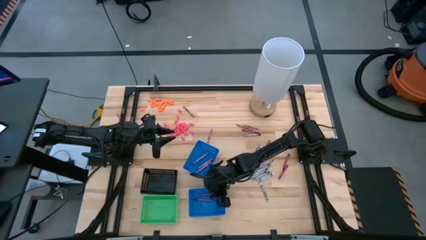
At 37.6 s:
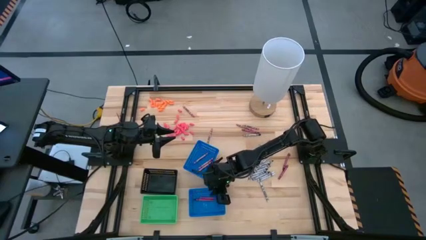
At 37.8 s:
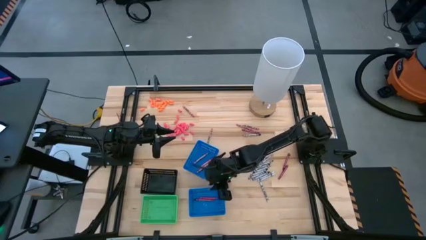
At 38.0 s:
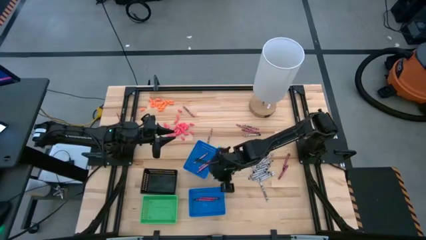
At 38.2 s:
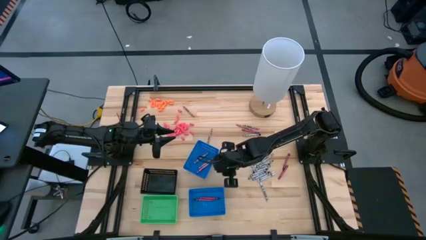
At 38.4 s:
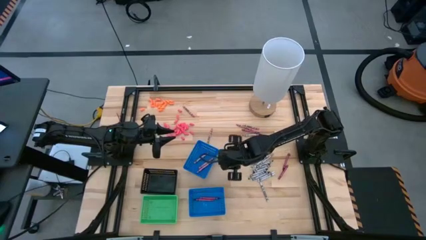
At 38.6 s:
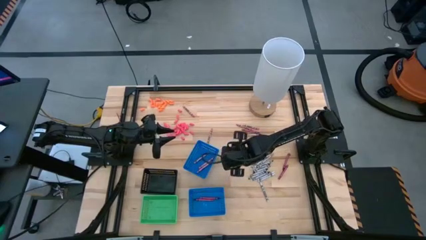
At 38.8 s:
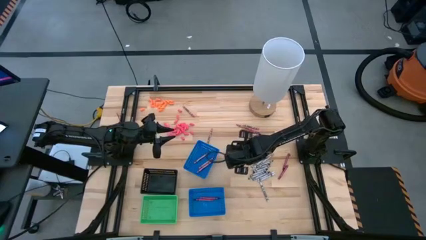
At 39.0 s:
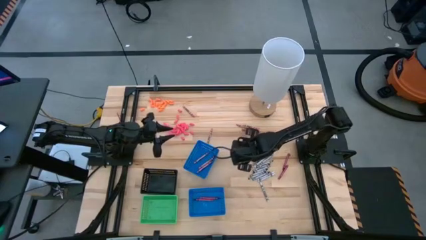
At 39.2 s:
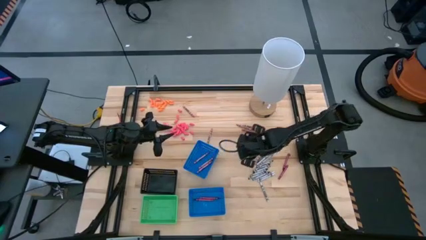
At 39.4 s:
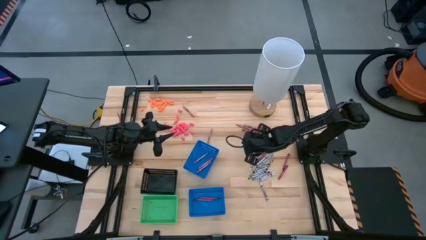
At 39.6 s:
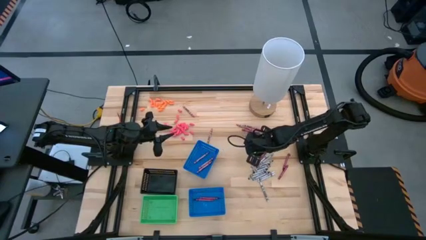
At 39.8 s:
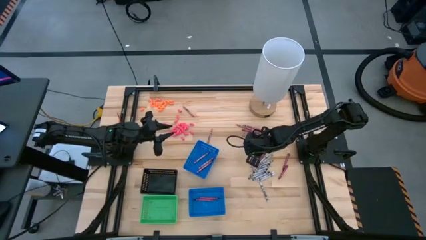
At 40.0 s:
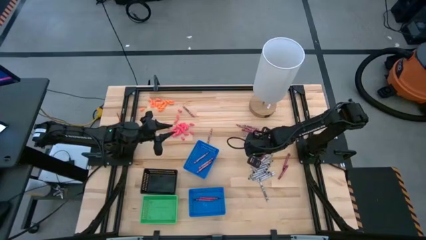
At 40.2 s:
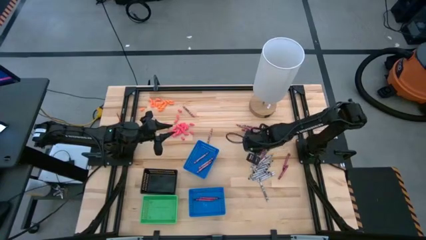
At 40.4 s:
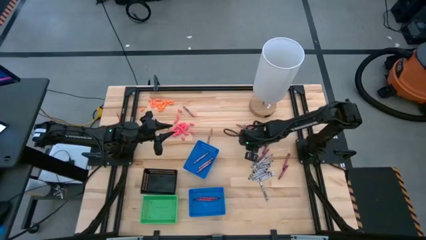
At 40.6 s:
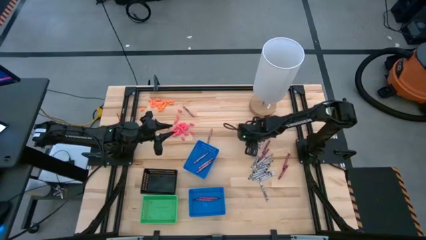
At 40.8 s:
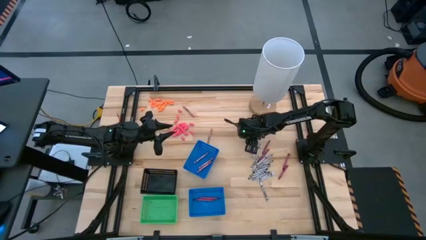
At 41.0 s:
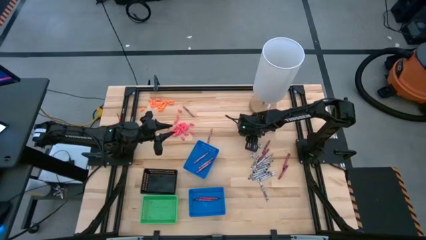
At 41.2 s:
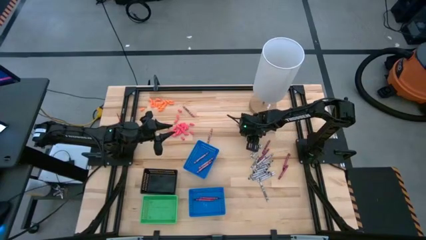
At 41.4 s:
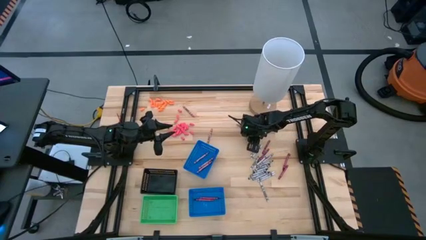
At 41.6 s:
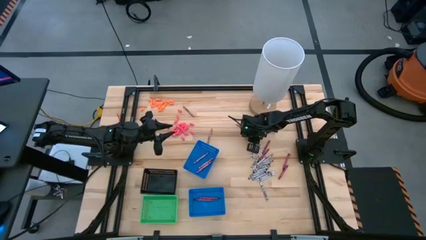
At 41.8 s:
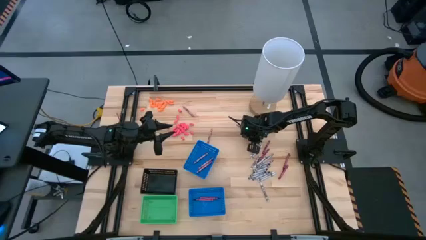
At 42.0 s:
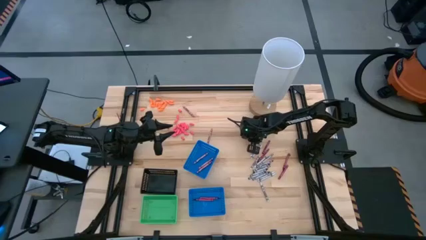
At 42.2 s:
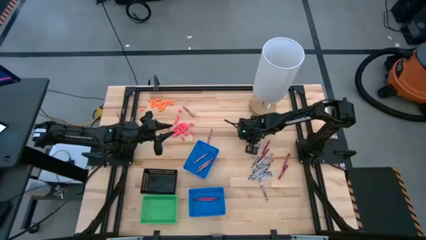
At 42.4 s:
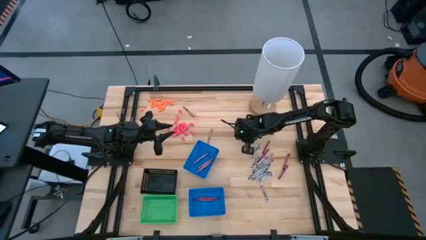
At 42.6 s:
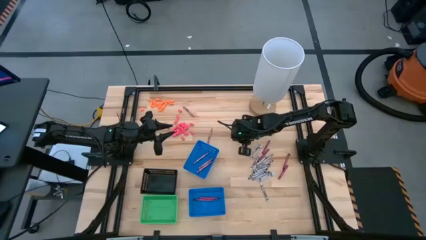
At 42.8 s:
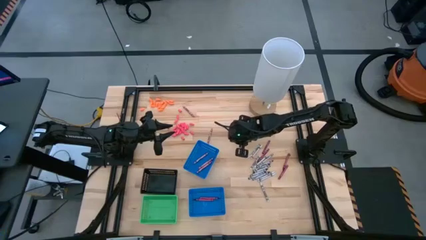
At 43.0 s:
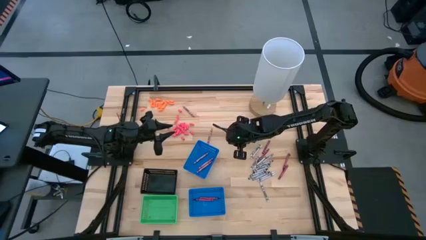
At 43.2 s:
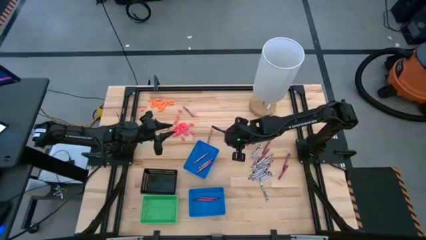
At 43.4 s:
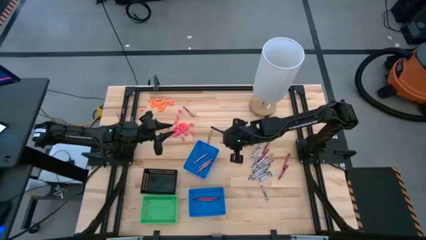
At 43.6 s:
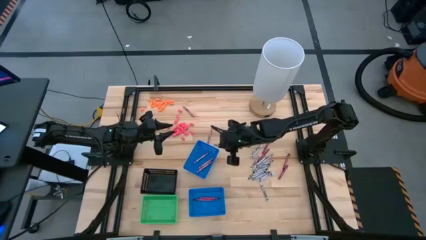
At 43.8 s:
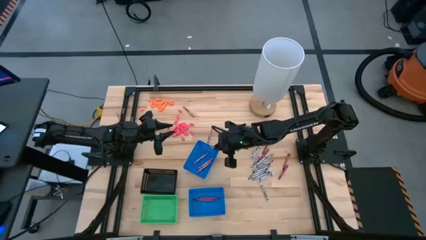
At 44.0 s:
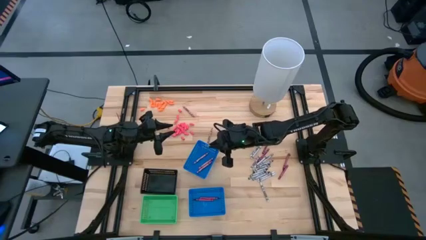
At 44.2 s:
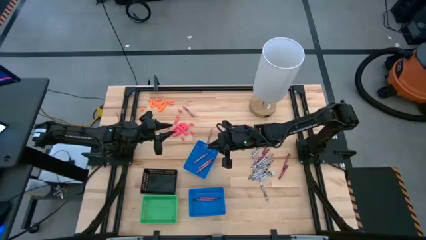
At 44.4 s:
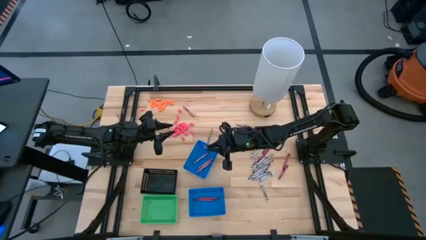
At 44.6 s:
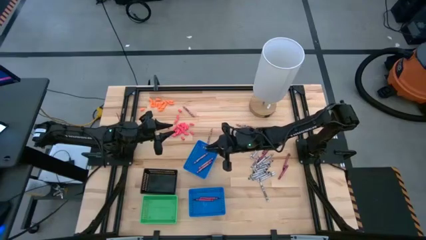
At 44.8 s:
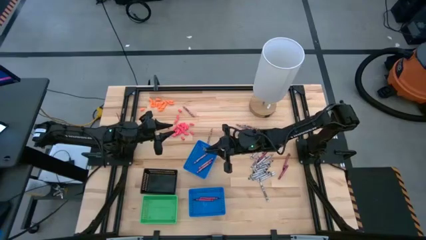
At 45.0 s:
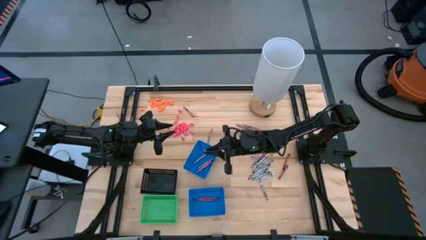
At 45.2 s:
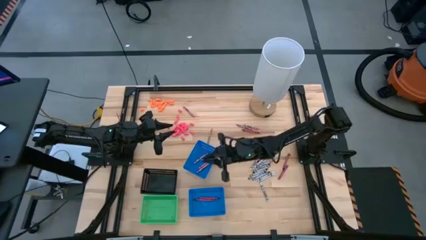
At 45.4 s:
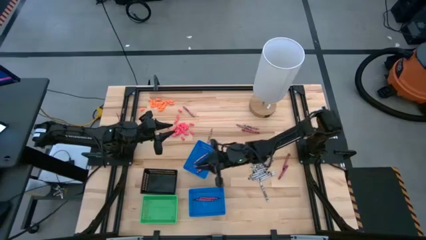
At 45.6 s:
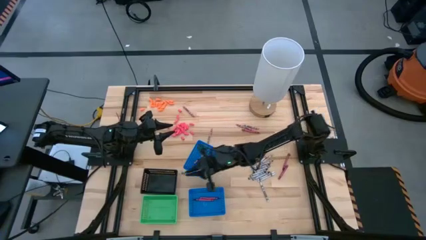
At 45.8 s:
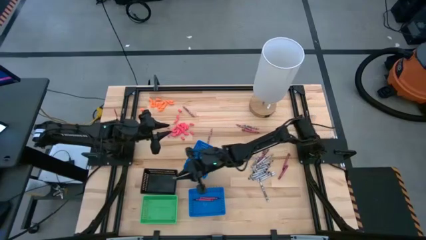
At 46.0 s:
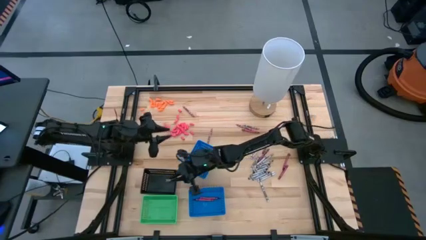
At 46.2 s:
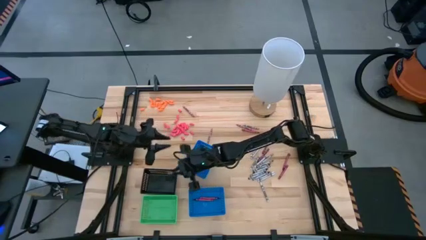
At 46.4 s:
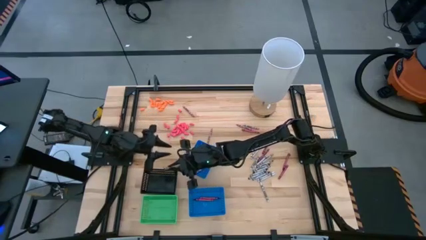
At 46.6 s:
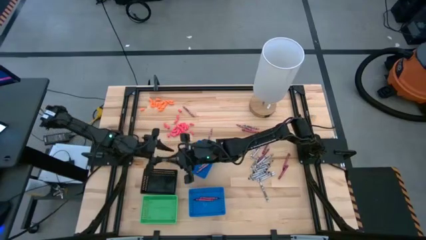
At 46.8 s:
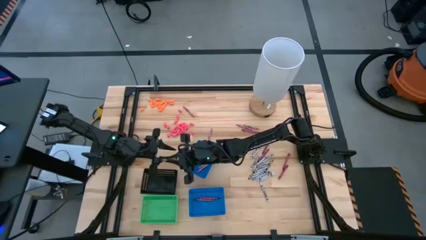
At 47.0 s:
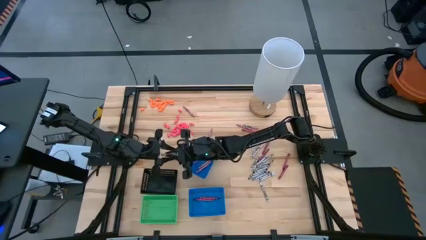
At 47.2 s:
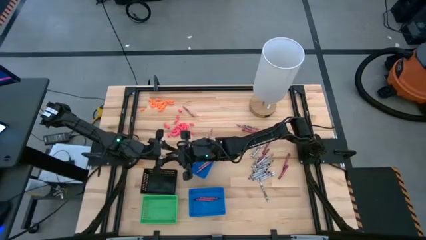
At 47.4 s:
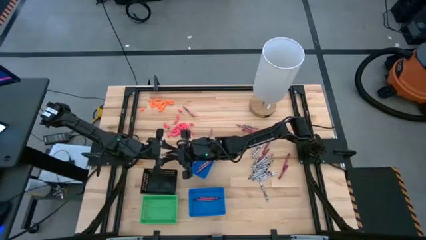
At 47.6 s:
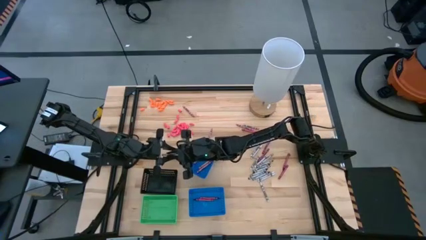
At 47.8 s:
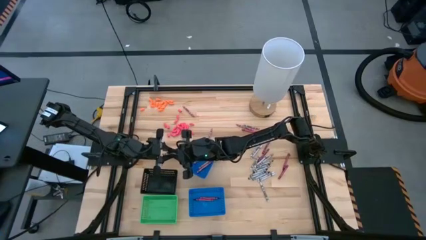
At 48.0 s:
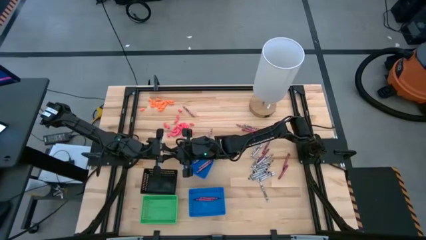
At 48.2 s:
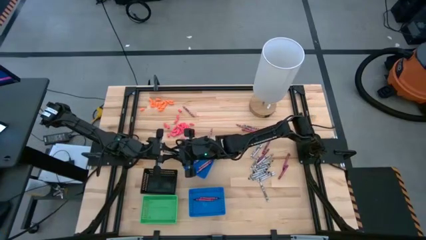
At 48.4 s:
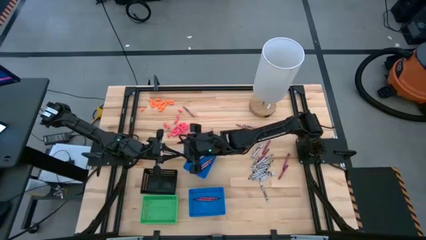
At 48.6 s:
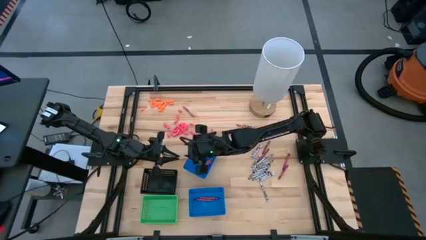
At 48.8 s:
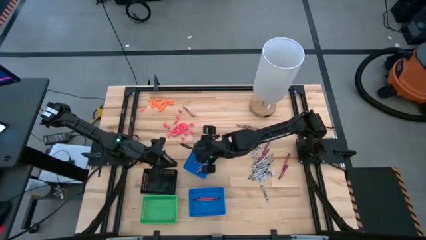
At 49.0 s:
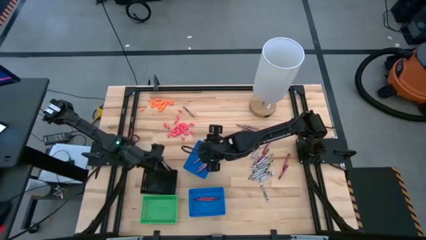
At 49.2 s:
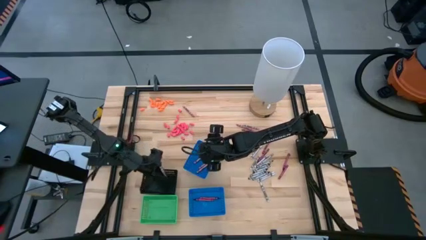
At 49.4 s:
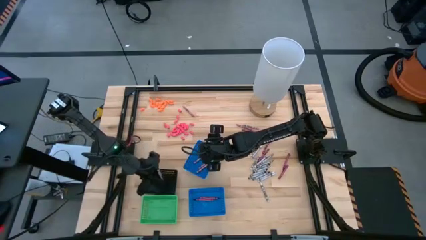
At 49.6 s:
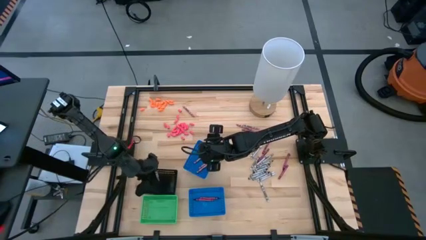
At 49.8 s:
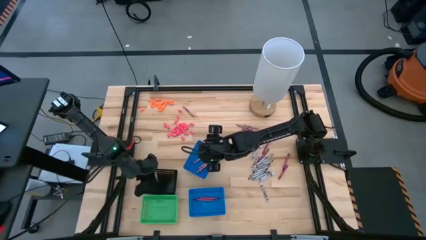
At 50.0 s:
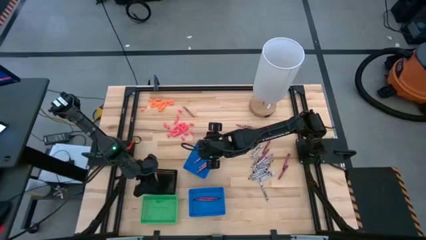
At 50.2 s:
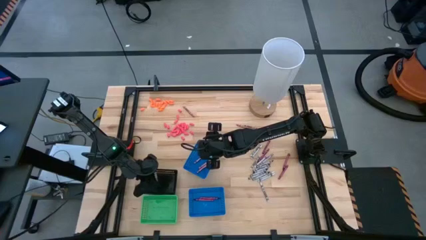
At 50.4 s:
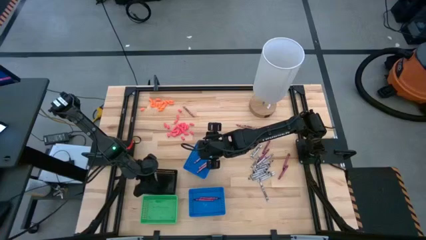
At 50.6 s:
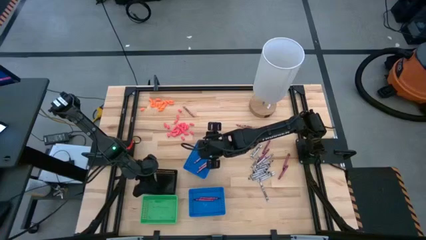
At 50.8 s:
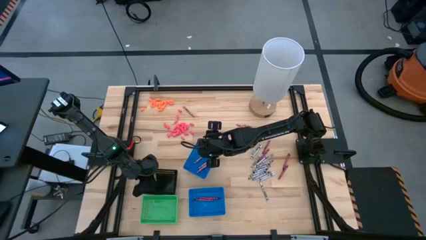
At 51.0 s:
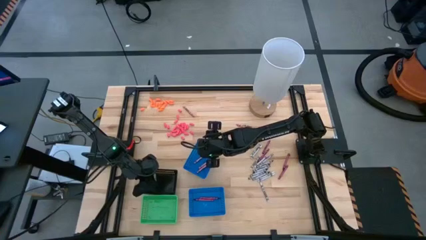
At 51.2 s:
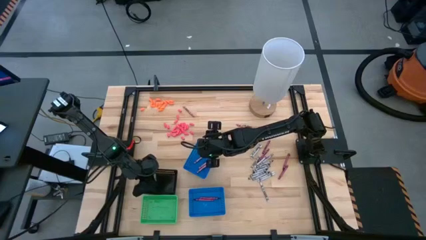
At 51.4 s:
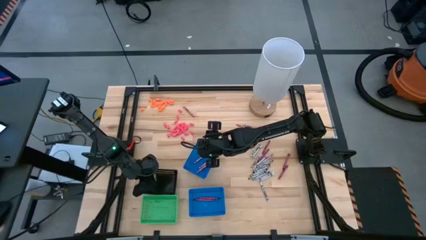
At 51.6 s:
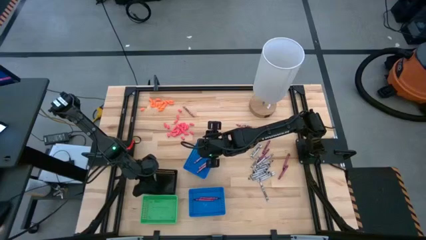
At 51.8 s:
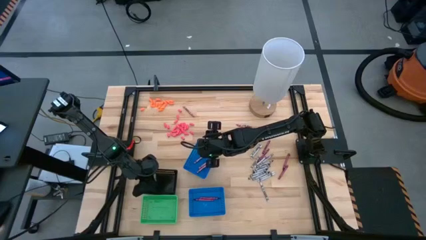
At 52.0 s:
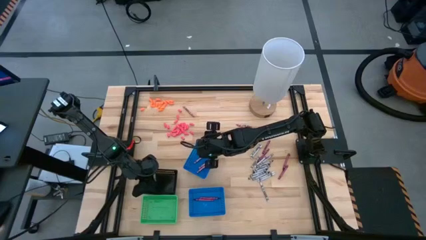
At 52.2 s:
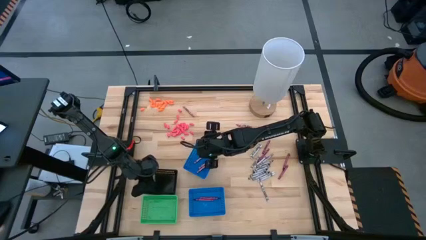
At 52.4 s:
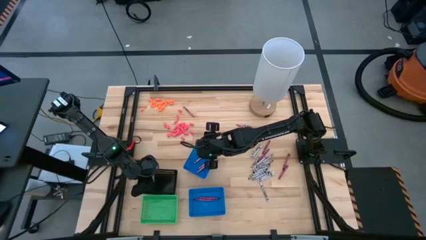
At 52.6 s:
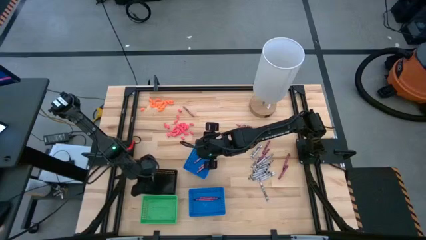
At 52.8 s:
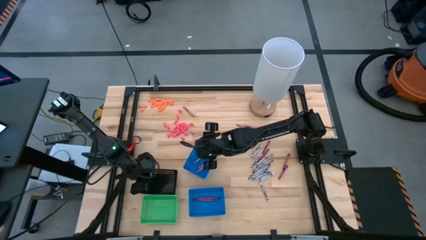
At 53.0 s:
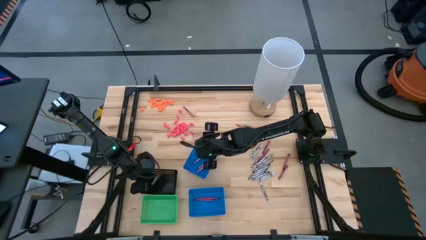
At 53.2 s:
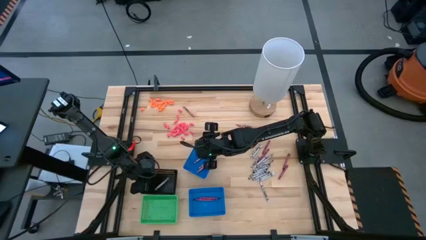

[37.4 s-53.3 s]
Task: Sort crayons
Put the black crayon into the black bin
